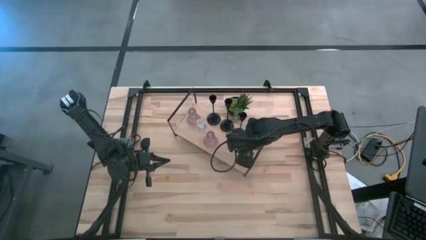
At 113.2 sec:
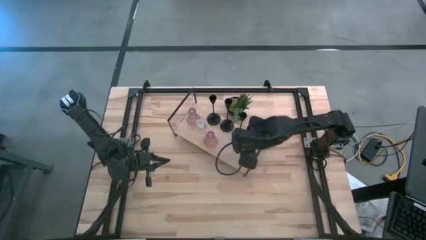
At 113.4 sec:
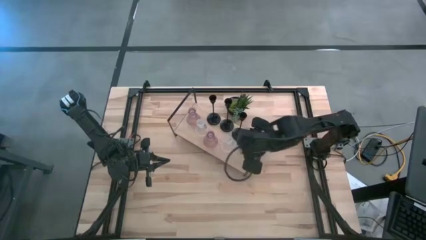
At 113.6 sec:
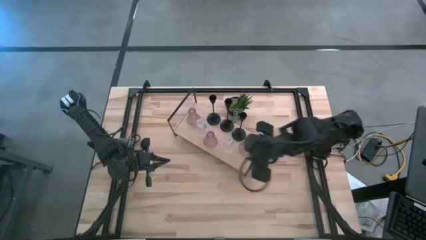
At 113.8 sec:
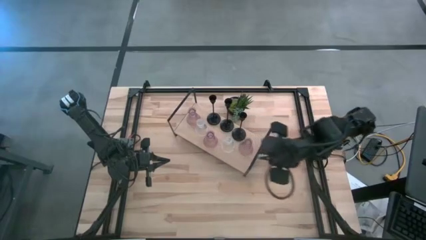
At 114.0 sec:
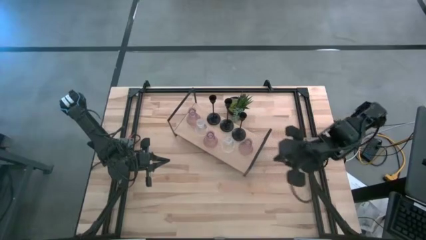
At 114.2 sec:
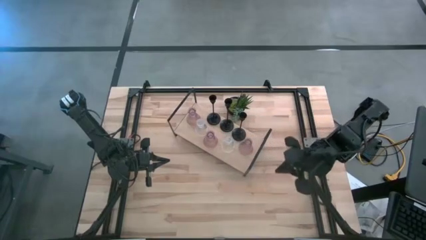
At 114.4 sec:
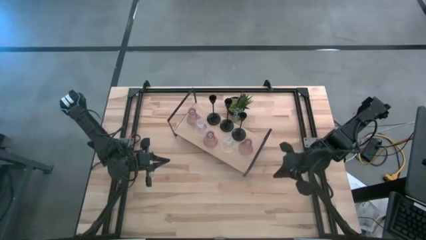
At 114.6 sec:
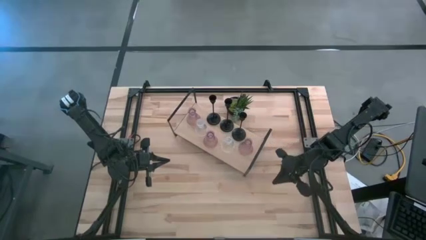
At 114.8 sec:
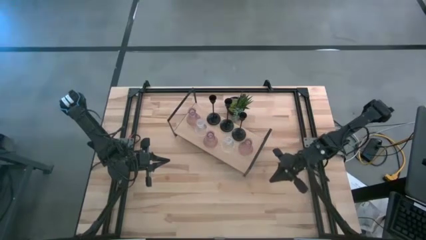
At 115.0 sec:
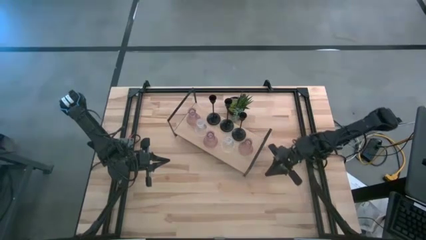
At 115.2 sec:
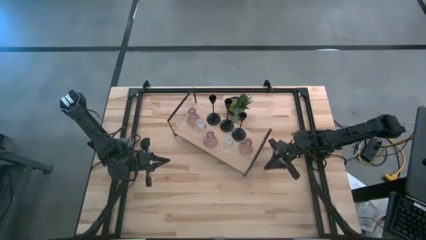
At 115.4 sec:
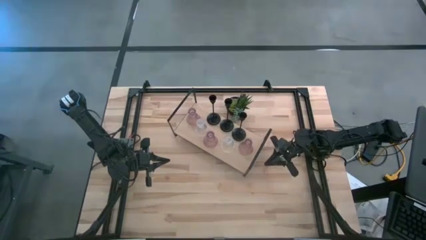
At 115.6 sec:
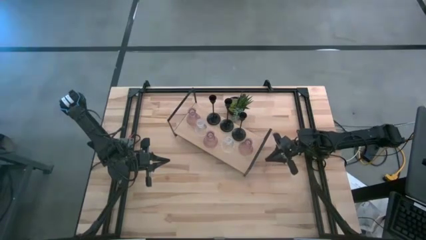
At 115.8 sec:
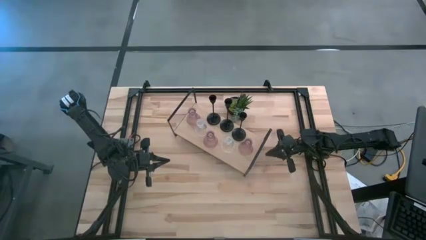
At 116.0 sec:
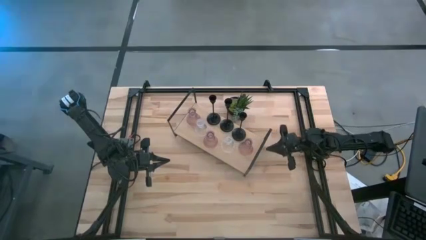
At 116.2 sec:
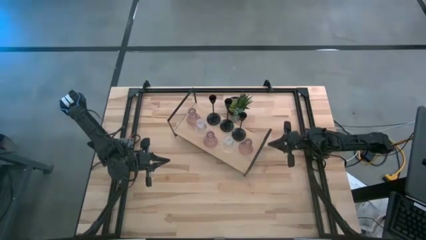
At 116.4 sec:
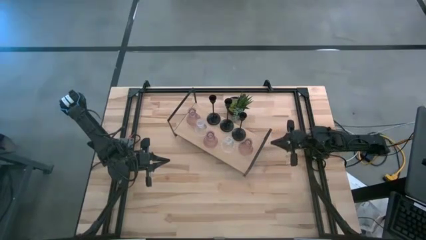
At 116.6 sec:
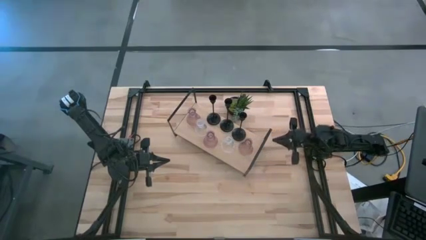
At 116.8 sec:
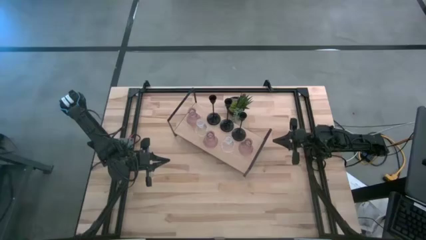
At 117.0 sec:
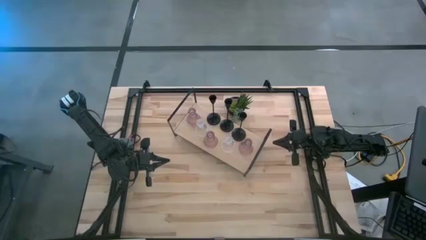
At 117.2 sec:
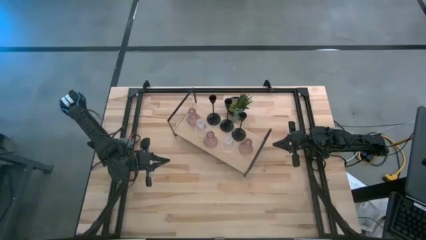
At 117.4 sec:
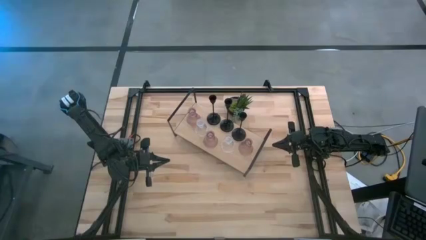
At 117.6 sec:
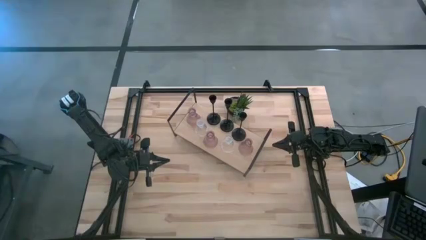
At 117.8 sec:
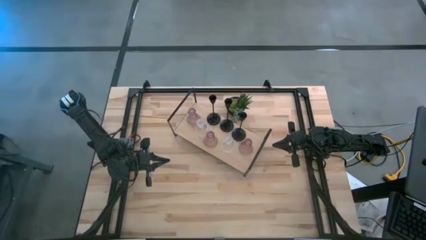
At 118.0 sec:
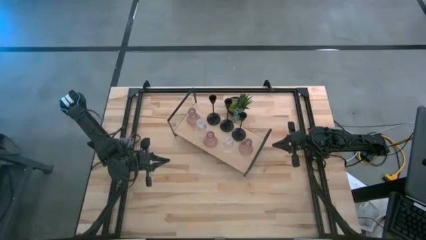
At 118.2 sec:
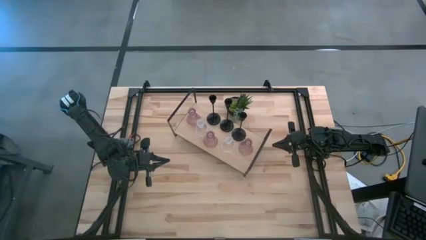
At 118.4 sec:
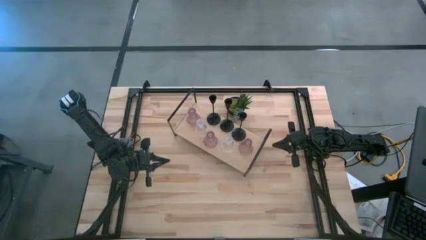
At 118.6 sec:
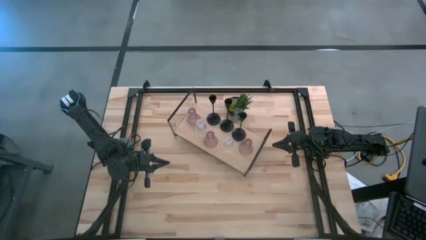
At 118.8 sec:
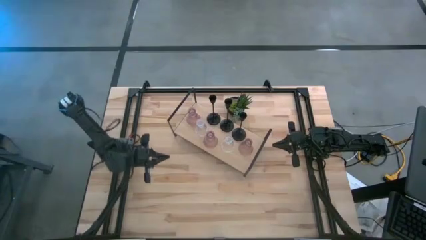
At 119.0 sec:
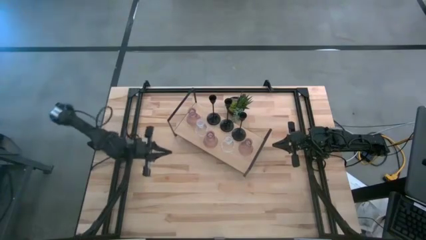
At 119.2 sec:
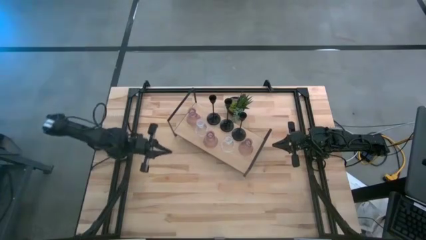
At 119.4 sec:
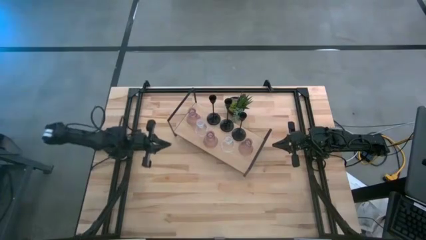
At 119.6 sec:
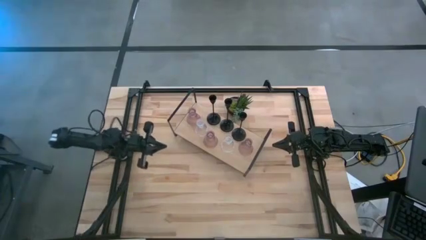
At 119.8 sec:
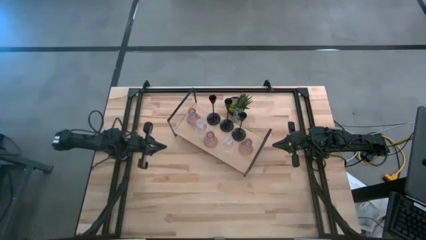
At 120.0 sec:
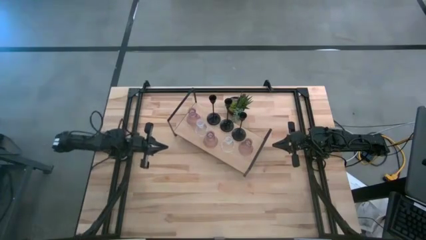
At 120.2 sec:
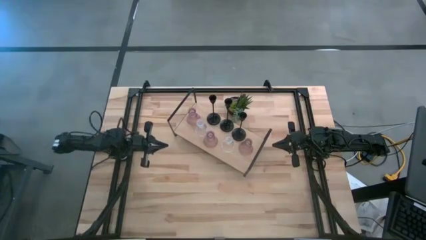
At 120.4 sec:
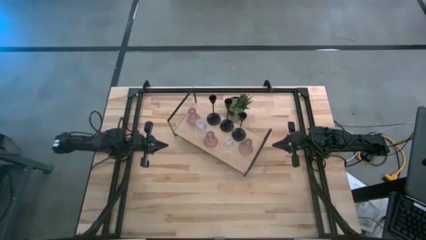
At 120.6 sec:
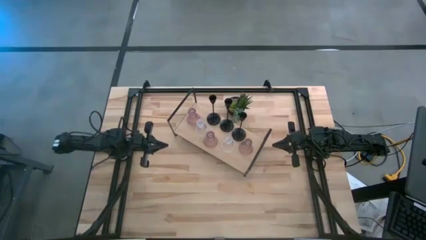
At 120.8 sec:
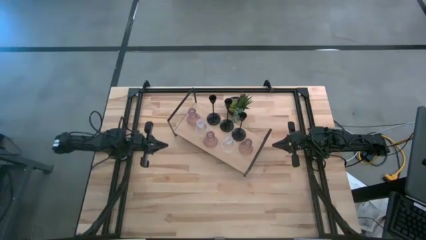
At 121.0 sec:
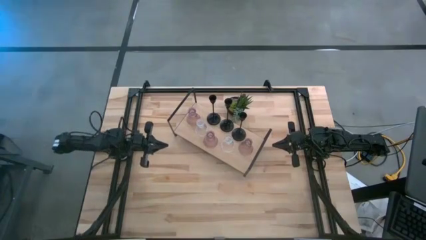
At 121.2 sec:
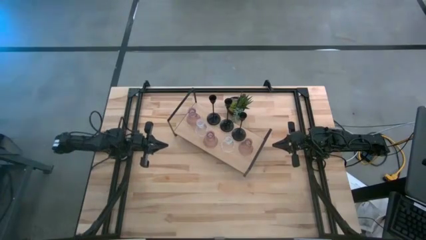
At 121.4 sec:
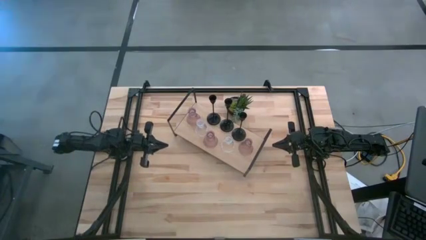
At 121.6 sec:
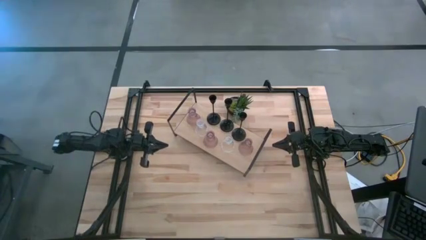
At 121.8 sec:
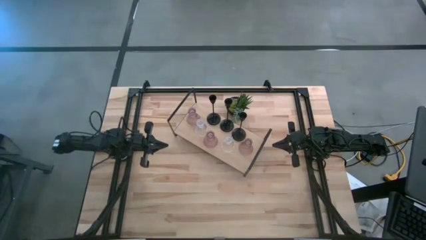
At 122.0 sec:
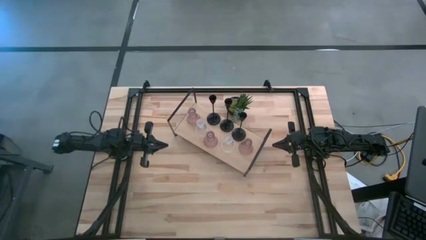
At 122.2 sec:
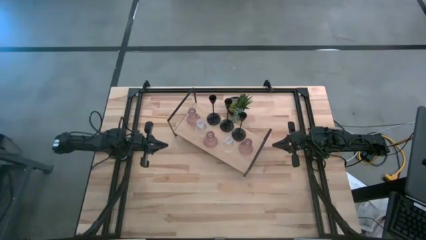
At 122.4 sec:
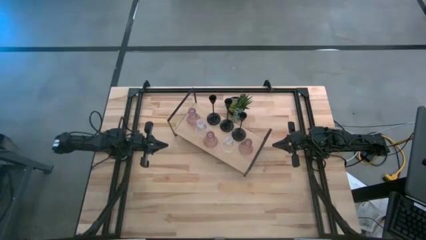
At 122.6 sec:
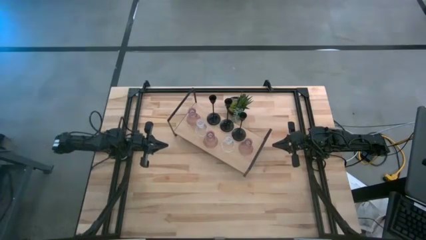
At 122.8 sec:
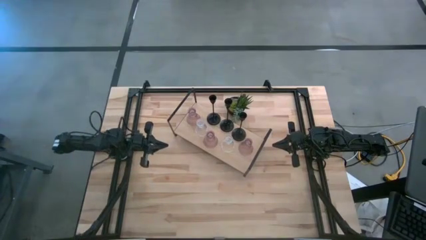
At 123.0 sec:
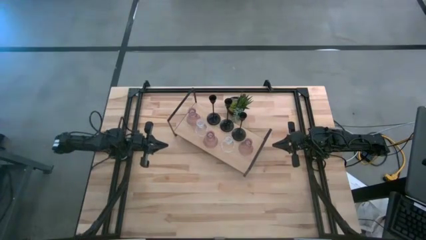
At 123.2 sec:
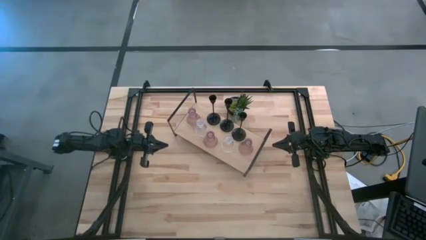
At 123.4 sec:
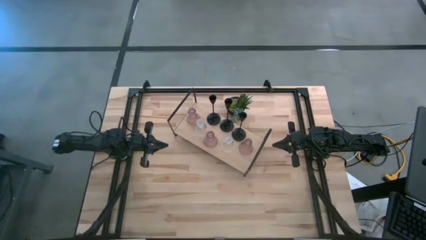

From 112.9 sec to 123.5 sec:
Task: Pick & Place candle stick holders
Return to Home Position

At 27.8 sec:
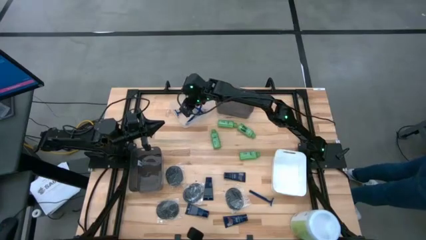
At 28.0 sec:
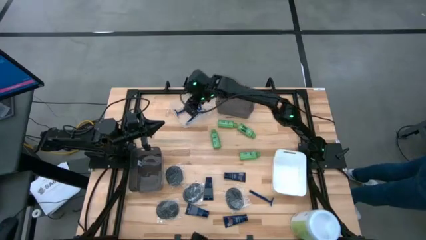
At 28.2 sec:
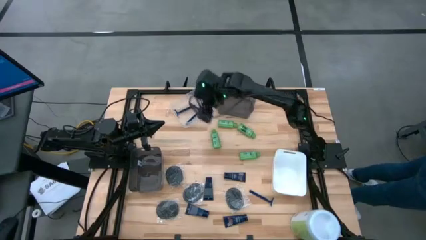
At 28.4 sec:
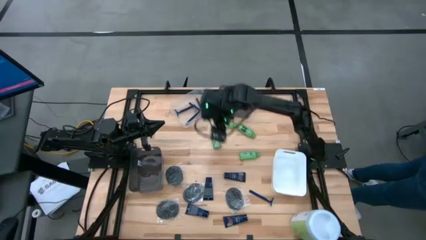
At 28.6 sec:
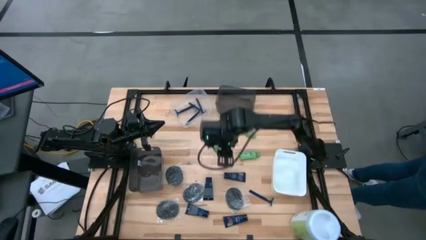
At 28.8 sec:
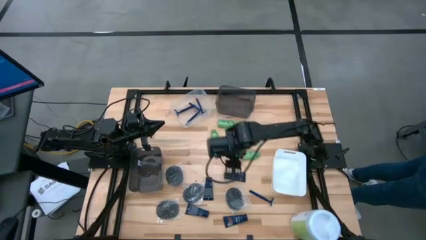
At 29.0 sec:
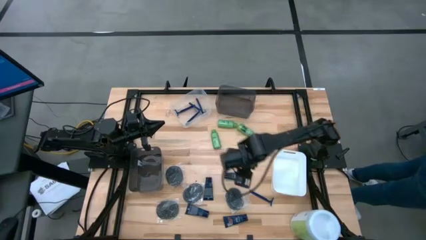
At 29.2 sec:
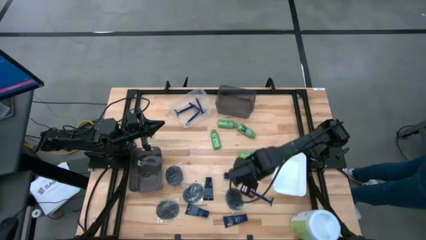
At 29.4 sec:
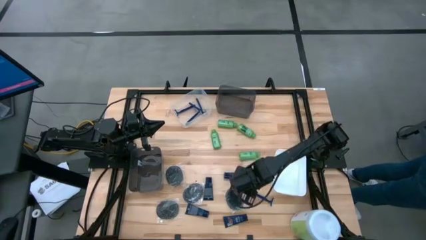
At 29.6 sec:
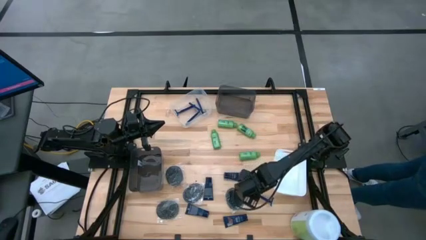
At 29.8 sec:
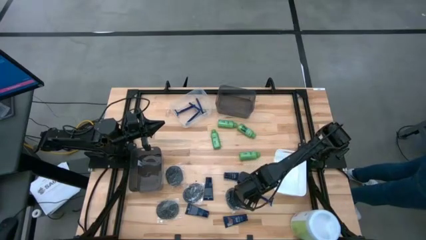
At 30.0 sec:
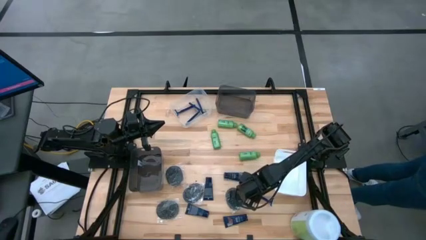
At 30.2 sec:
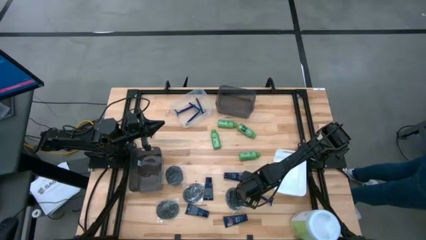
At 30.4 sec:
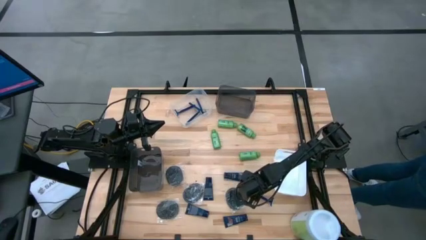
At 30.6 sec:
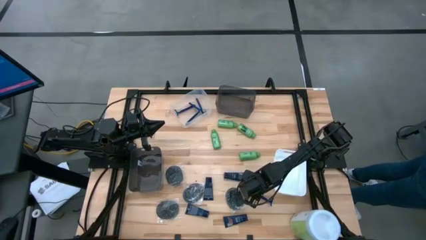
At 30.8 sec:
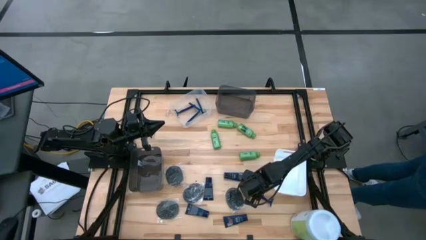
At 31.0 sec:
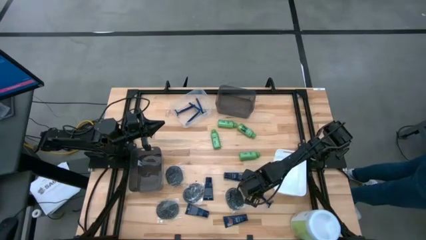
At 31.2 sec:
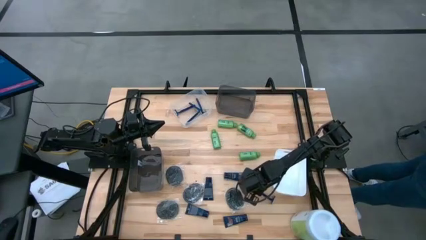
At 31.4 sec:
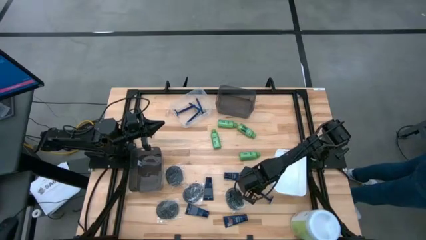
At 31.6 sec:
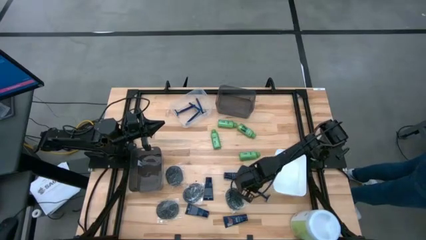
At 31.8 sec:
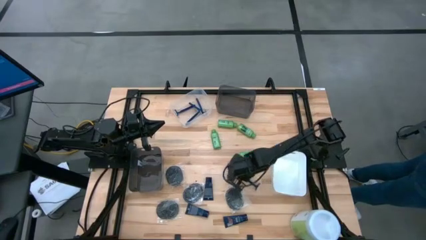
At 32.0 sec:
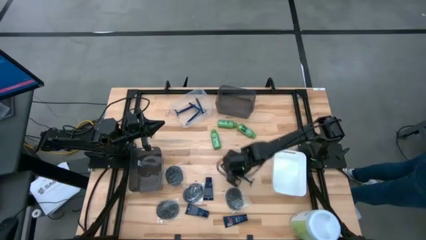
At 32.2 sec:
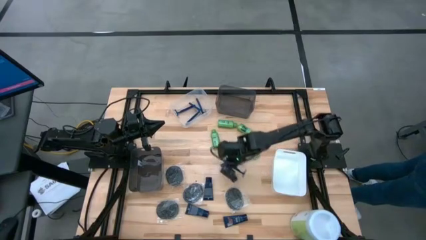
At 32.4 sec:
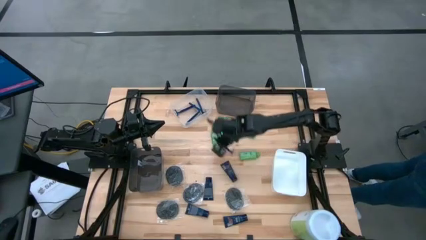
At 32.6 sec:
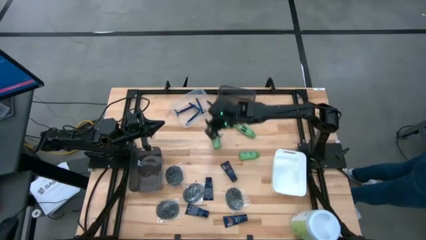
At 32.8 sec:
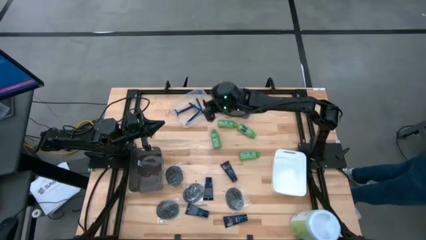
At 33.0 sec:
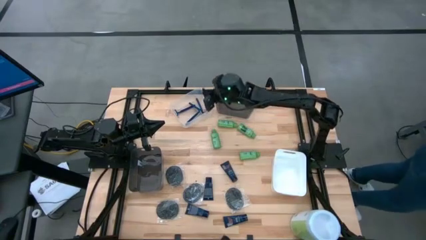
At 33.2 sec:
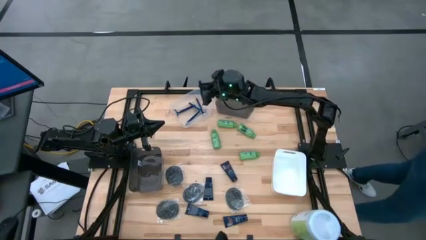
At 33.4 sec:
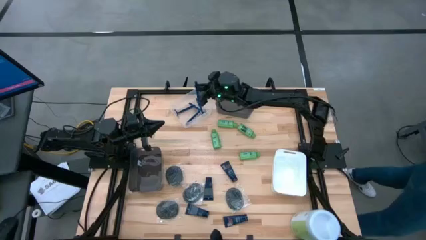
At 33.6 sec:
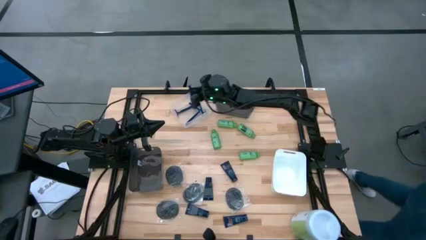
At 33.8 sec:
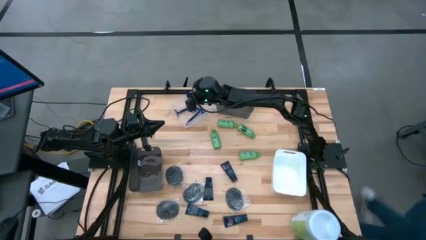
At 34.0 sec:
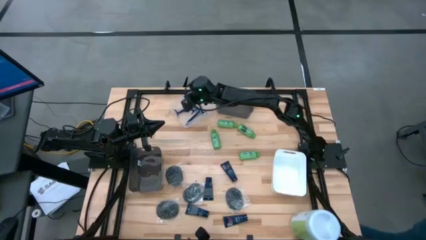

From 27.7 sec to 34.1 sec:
Task: Pick & Place Travel size toiletries
Put the blue razor into the white transparent bin
